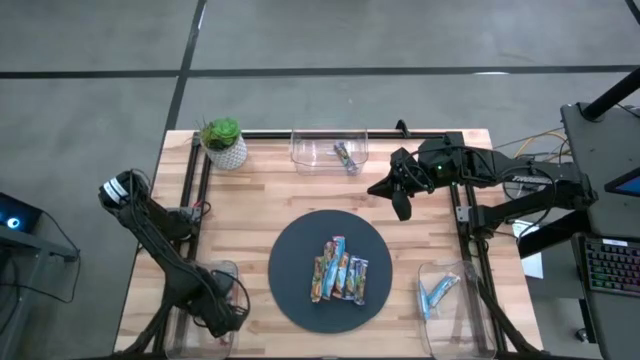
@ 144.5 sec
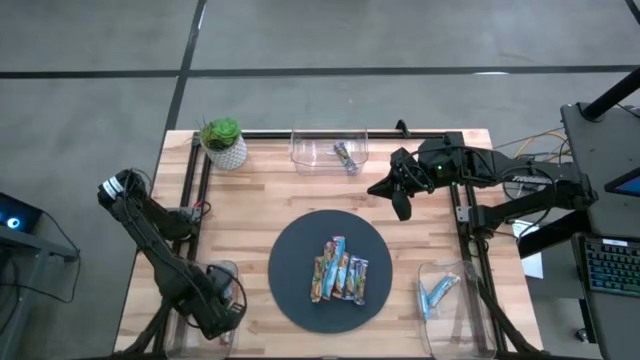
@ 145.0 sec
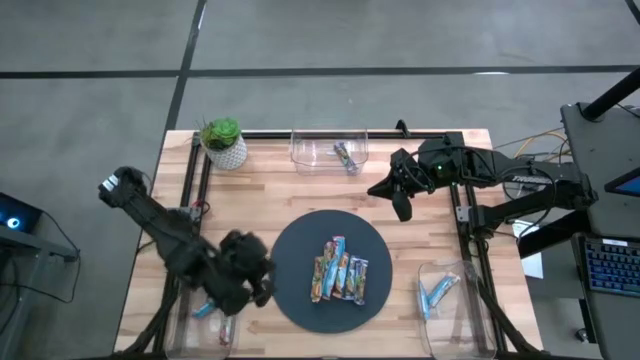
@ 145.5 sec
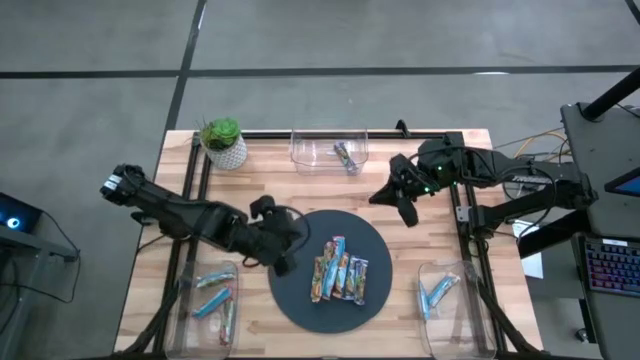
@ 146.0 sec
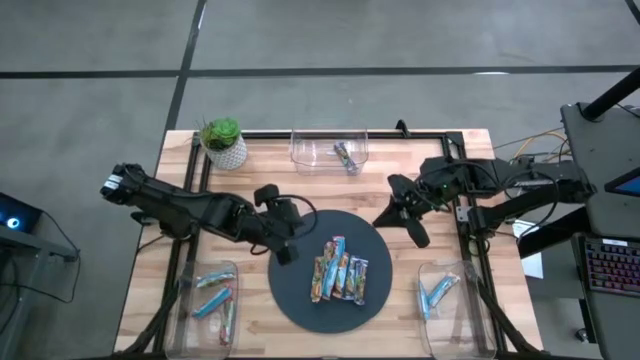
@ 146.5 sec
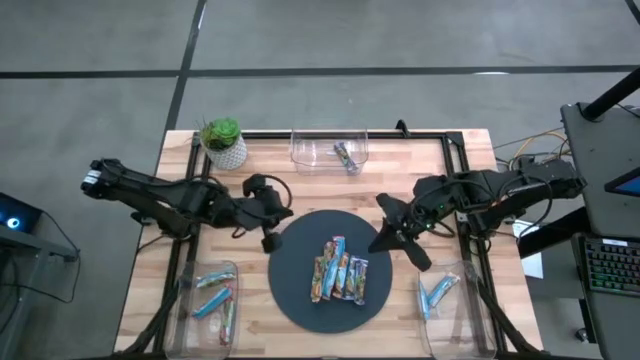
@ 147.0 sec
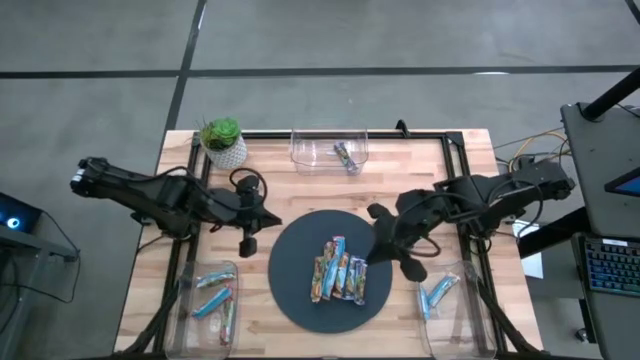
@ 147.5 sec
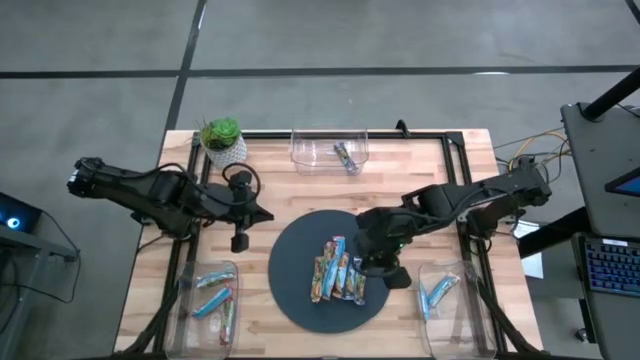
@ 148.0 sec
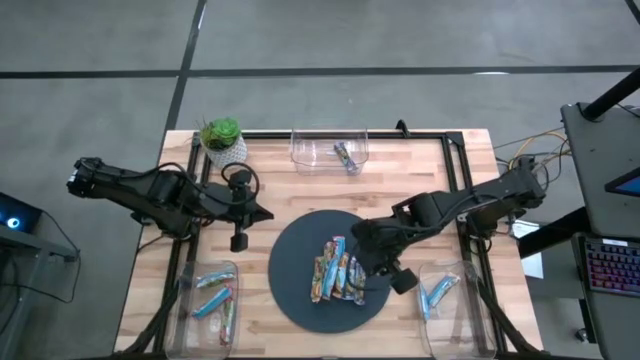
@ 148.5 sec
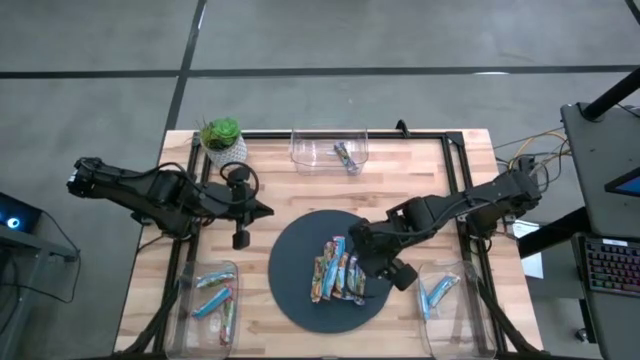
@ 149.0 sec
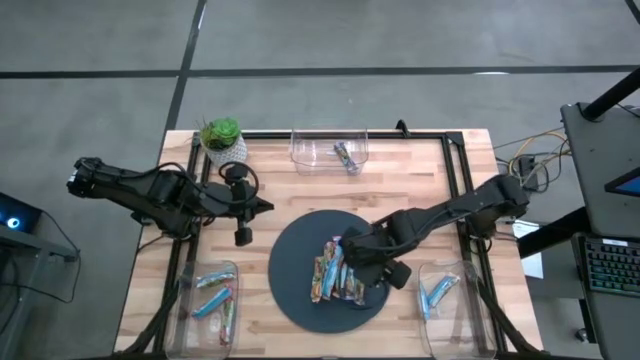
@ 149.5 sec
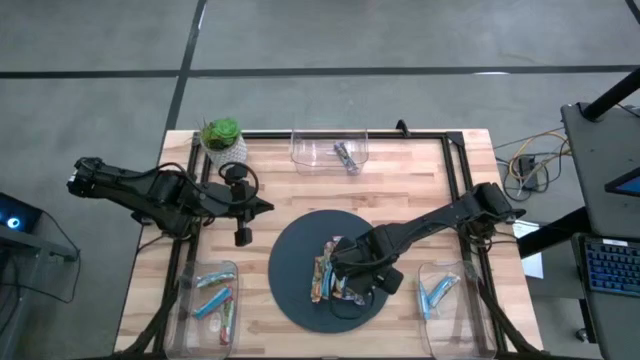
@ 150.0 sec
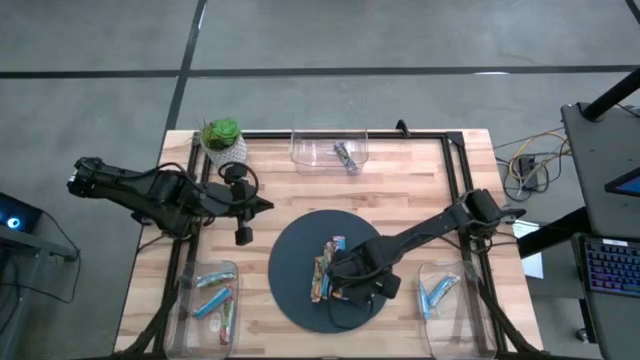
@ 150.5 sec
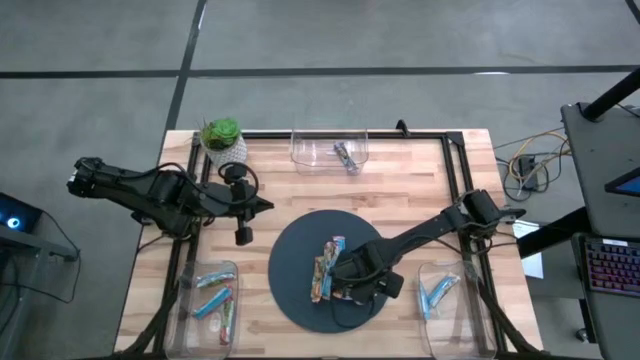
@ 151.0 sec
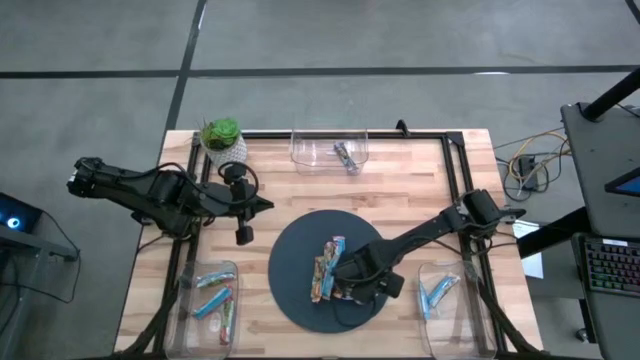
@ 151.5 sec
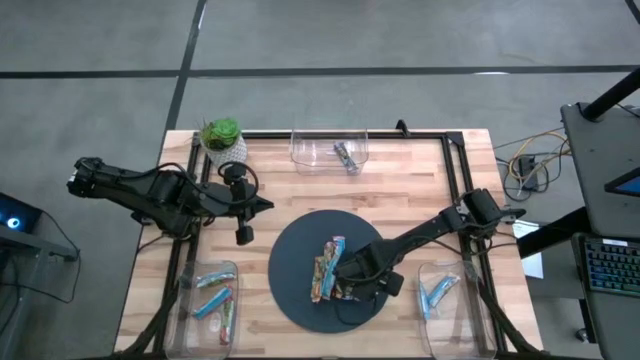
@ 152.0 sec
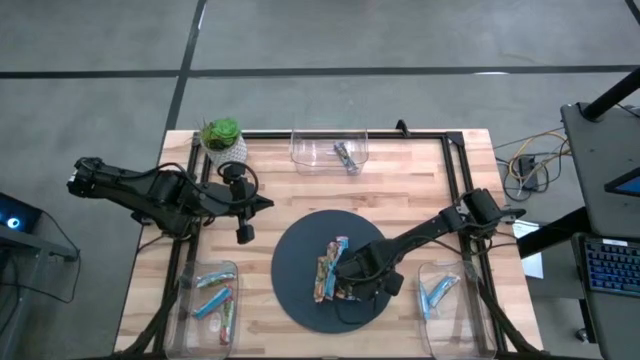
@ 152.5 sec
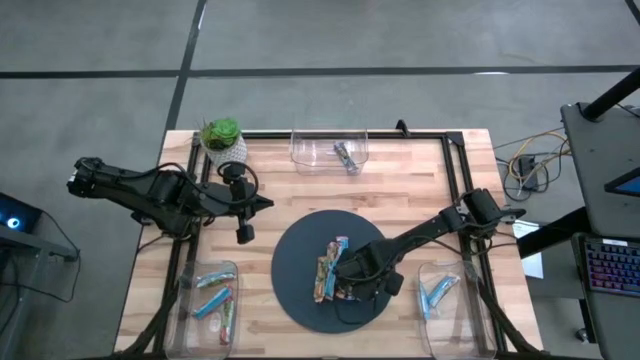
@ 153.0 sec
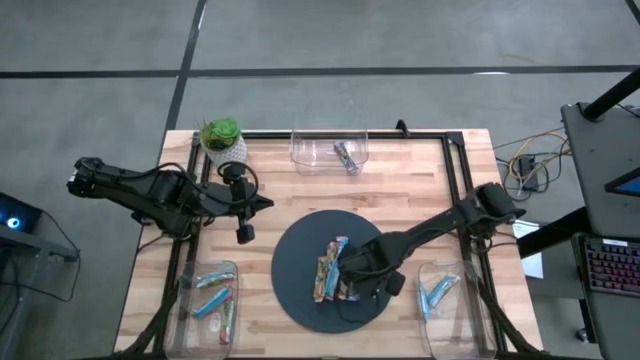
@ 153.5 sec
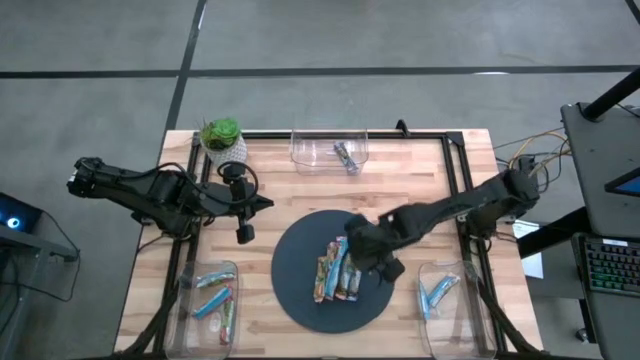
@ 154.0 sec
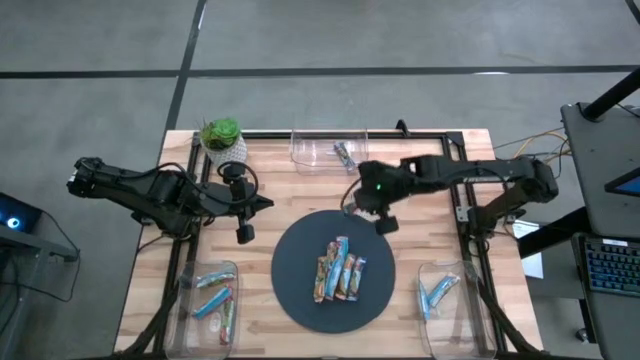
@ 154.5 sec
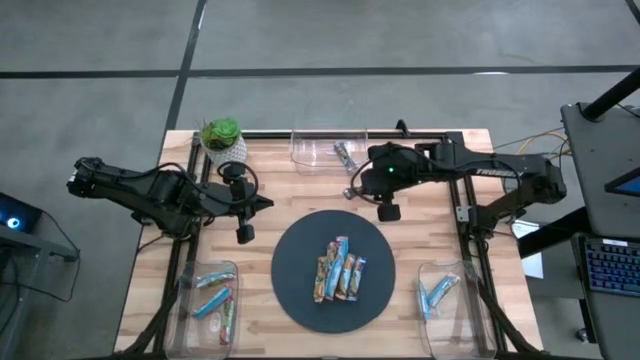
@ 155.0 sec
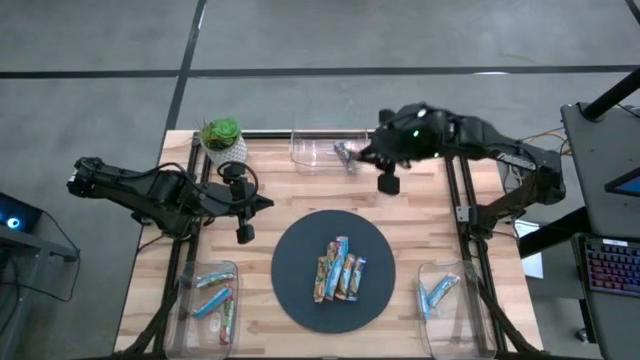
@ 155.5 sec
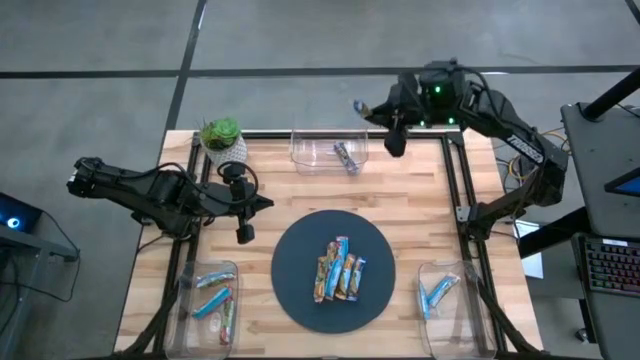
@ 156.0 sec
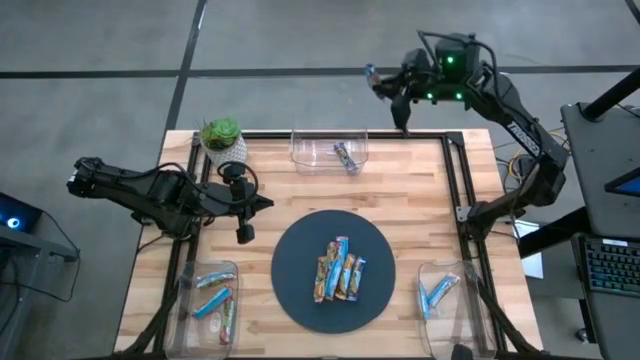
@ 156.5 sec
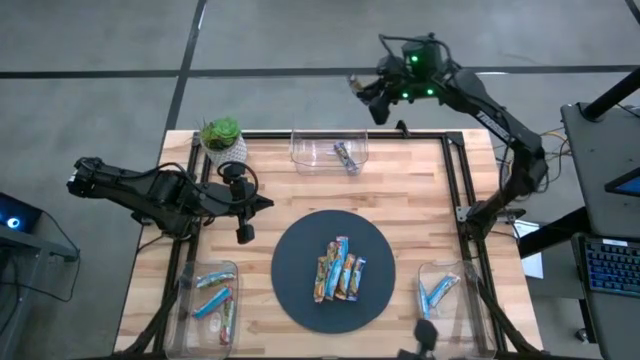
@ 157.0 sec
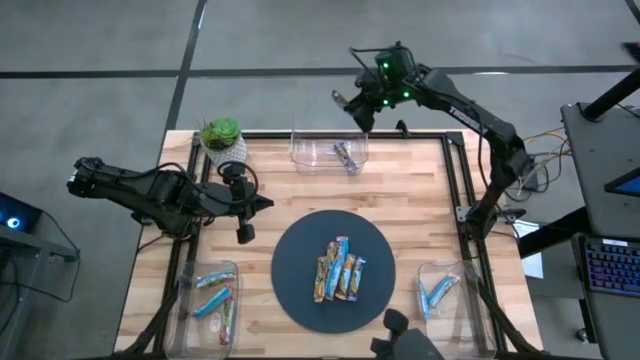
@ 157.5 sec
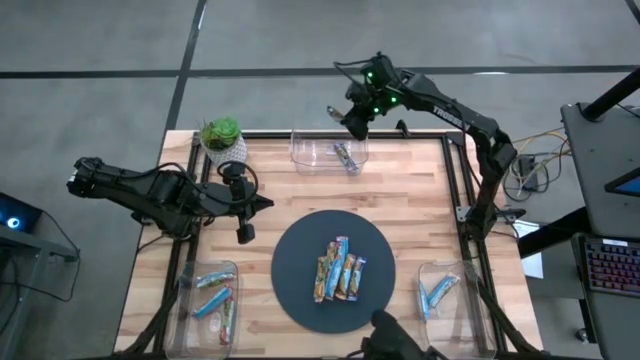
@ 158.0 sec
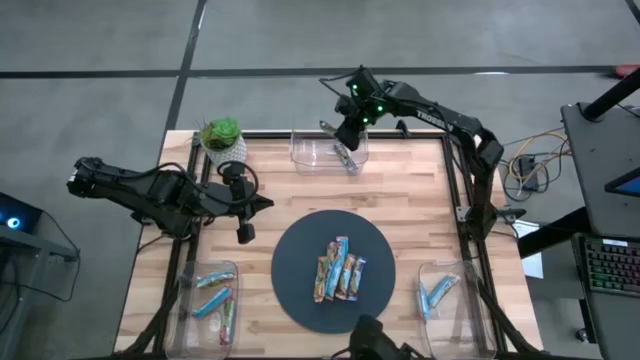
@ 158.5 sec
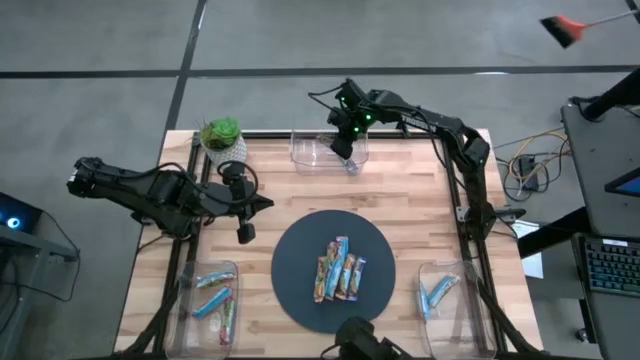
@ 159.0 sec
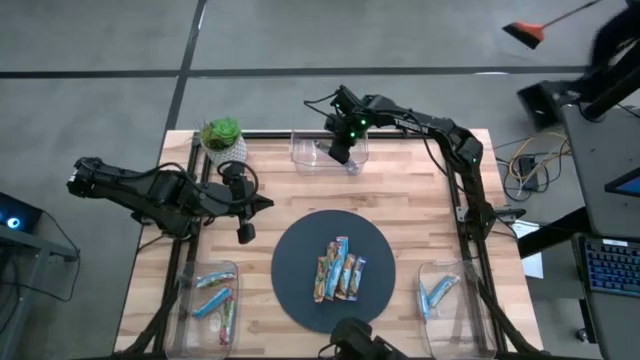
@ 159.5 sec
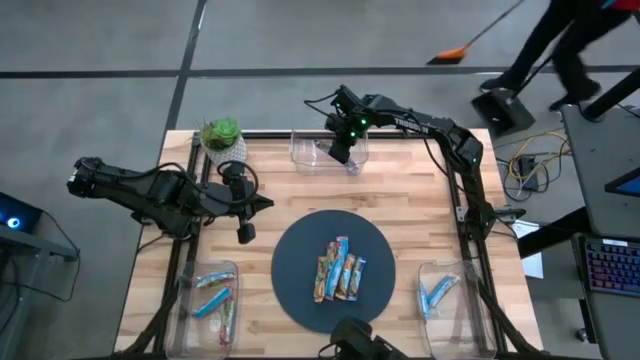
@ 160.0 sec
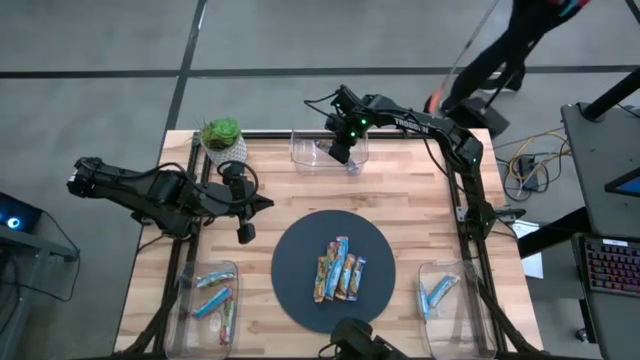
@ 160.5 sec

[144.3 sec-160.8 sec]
Task: Pick and place Granola Bars by type
Put the blue granola bar into the top transparent bin

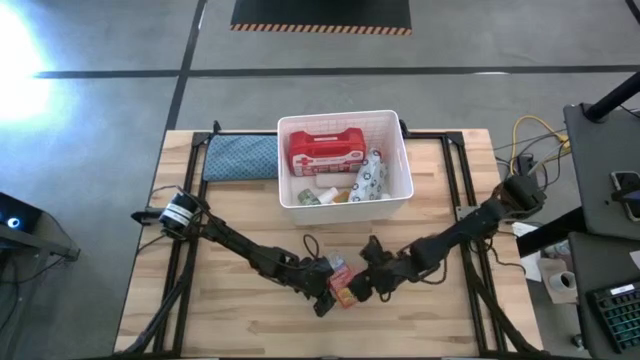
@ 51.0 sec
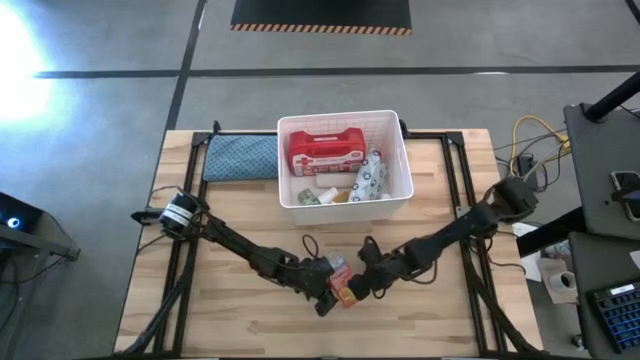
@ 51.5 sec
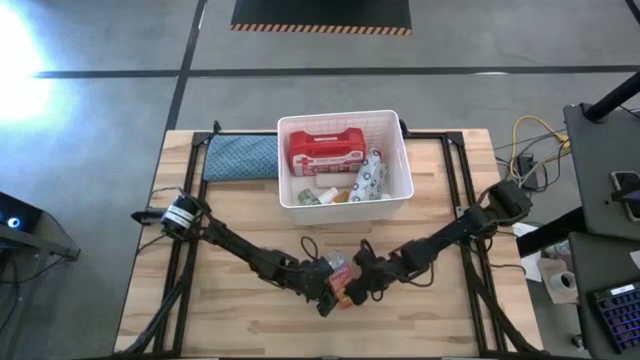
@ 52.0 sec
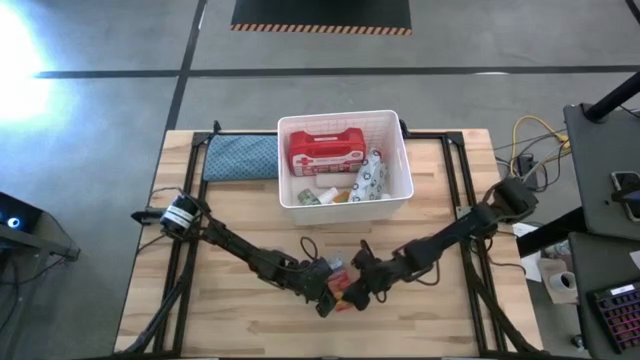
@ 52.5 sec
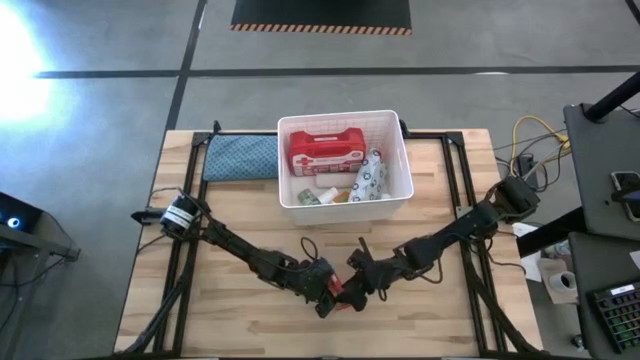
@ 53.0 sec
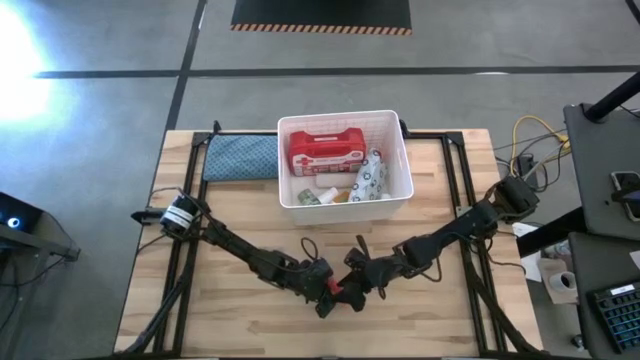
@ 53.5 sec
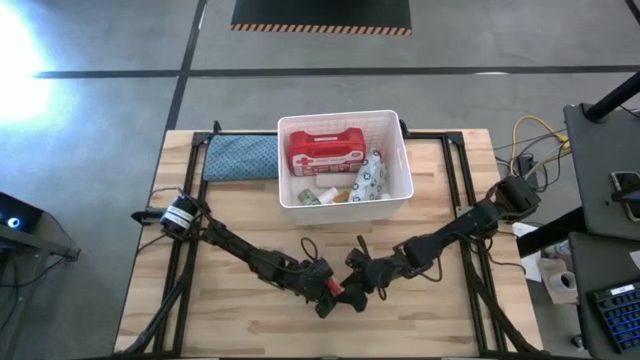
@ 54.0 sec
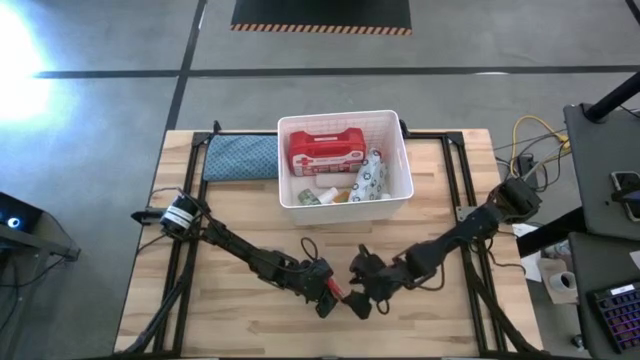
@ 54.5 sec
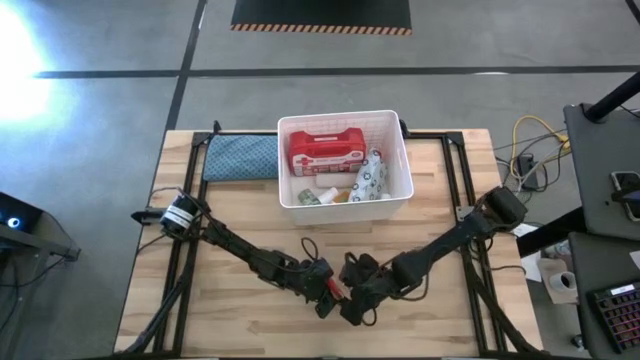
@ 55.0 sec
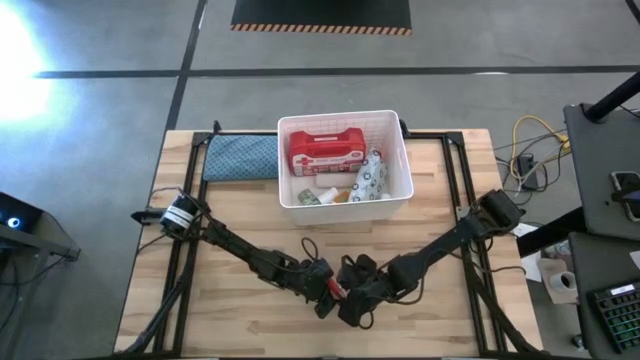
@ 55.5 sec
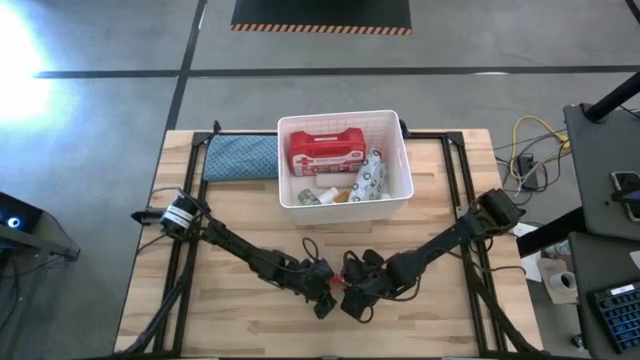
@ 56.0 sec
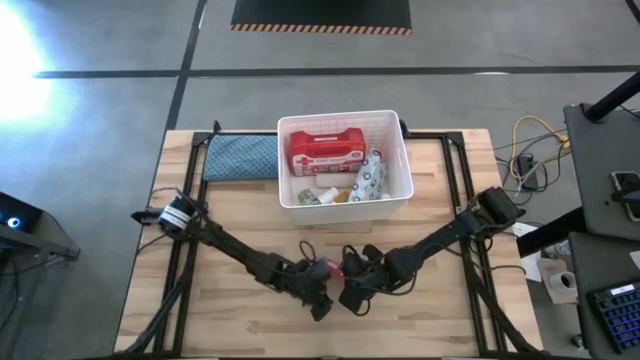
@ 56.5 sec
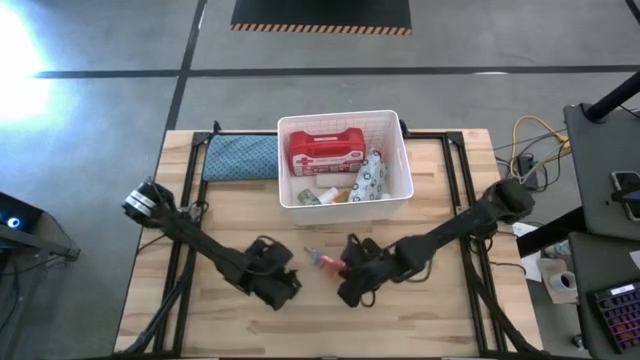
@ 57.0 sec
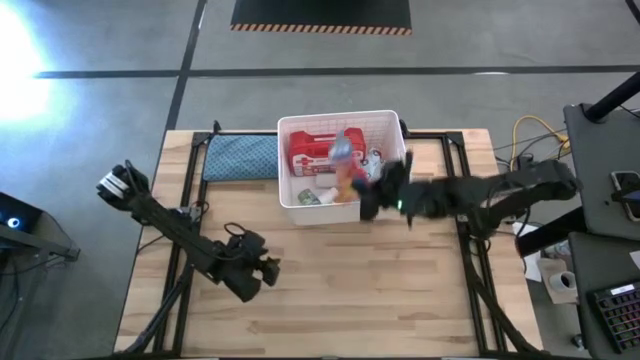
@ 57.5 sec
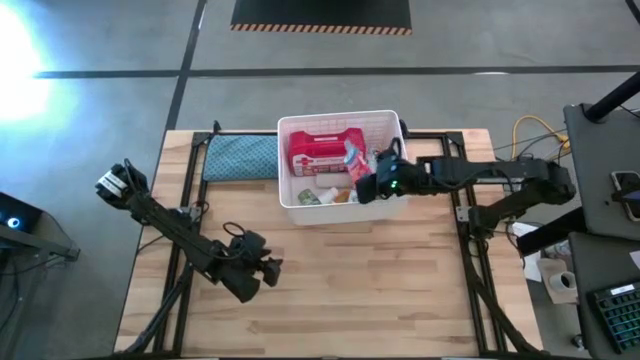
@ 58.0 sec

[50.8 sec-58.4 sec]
Task: Pick & place medical supplies in basket/bin
Put the red pill box into the bin
